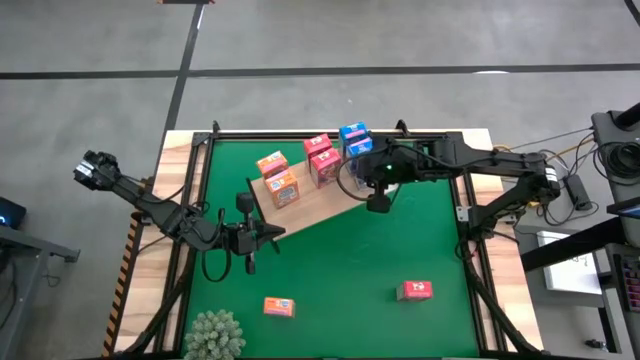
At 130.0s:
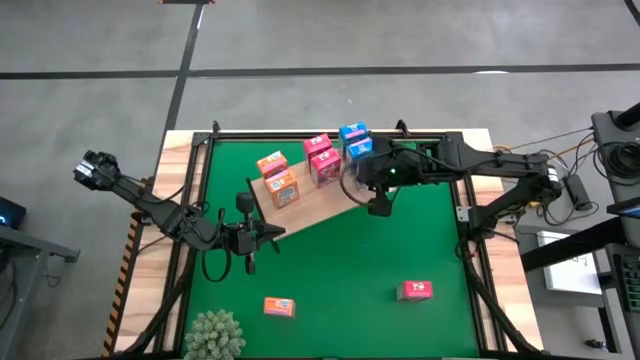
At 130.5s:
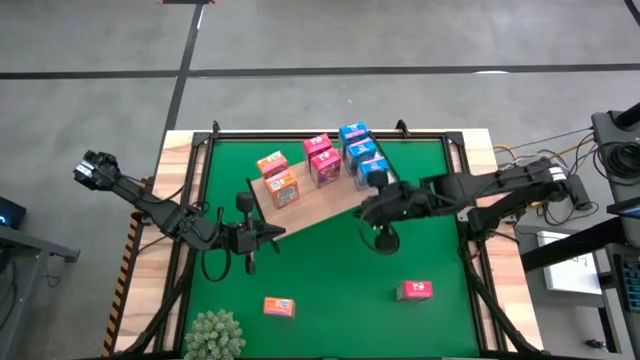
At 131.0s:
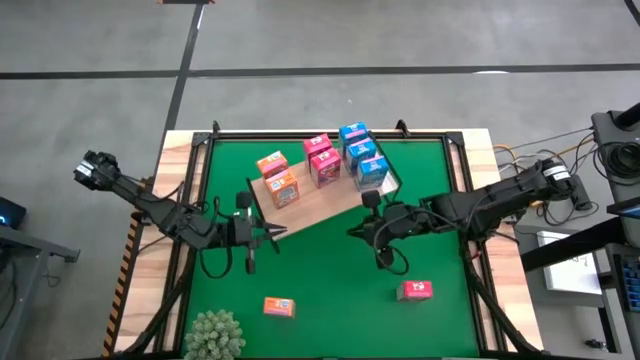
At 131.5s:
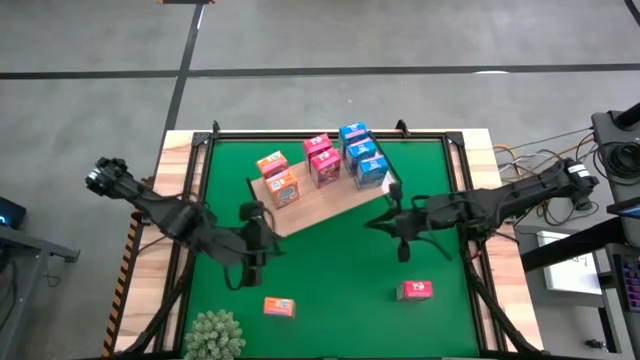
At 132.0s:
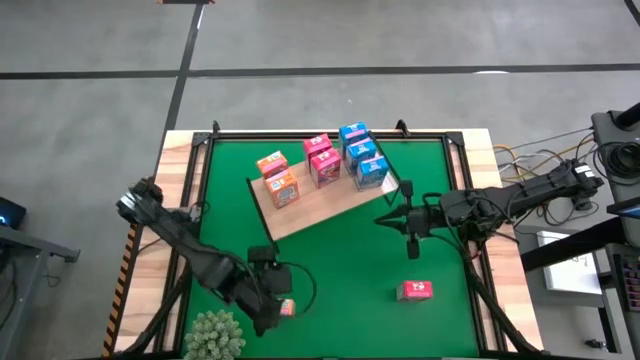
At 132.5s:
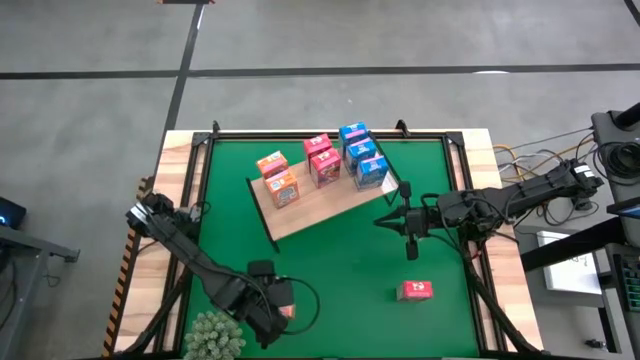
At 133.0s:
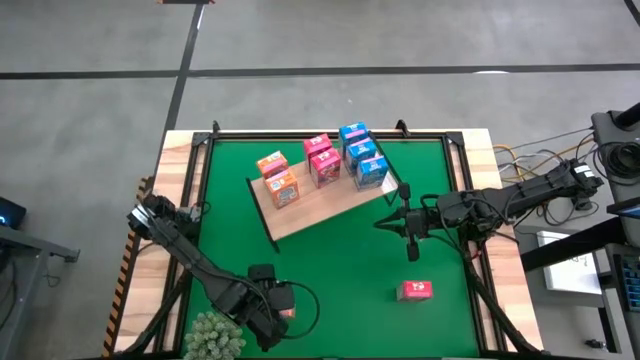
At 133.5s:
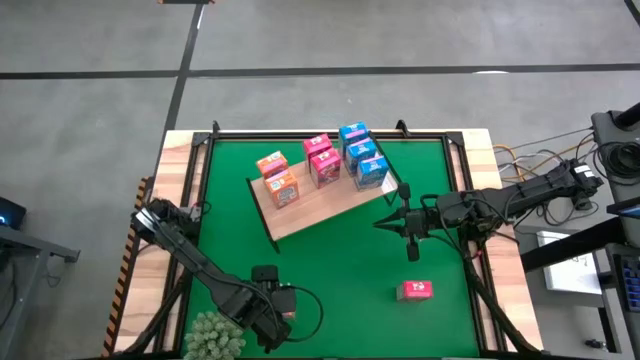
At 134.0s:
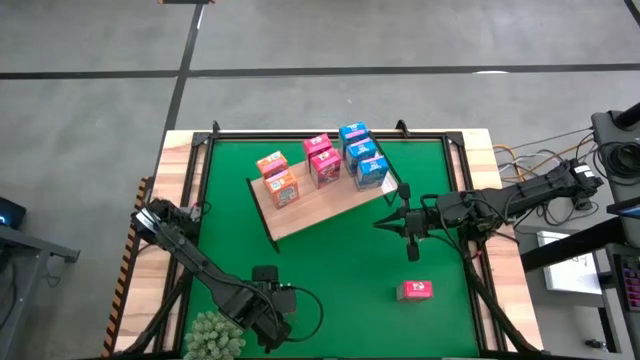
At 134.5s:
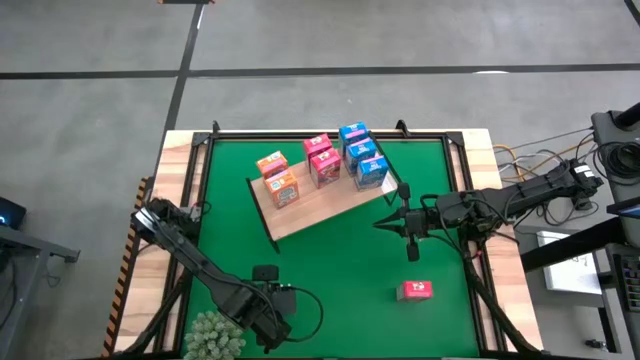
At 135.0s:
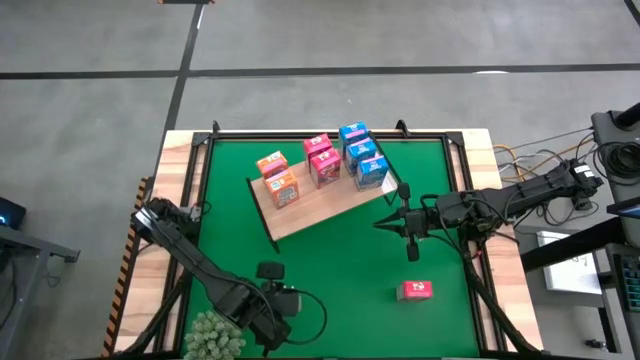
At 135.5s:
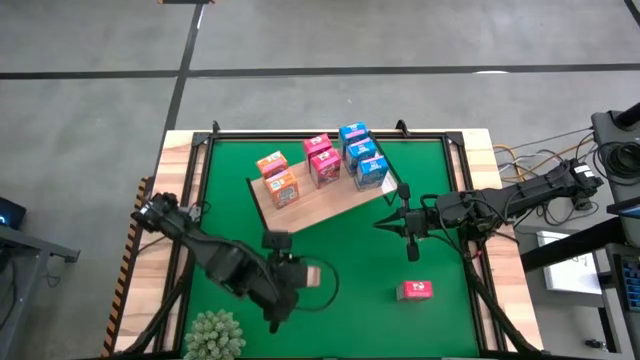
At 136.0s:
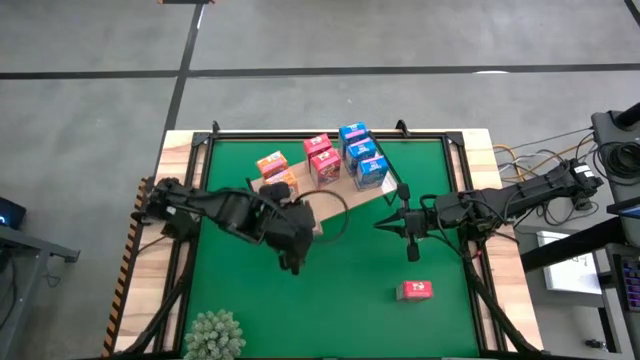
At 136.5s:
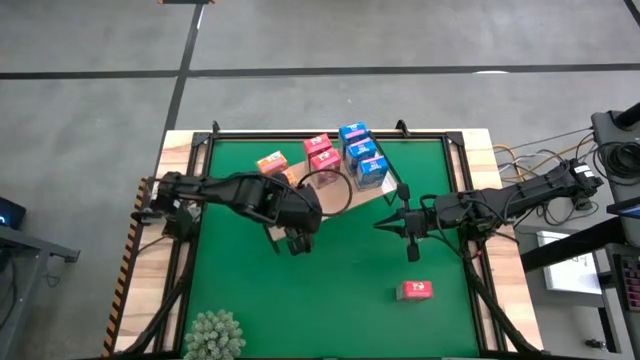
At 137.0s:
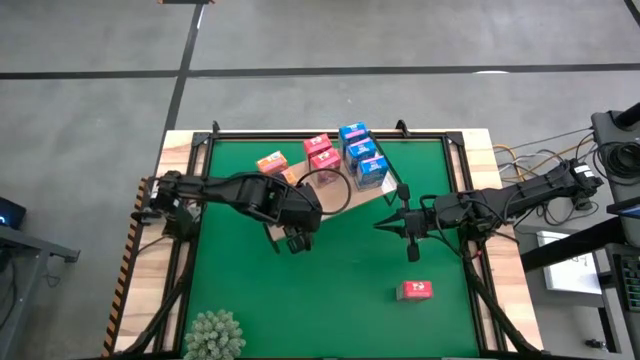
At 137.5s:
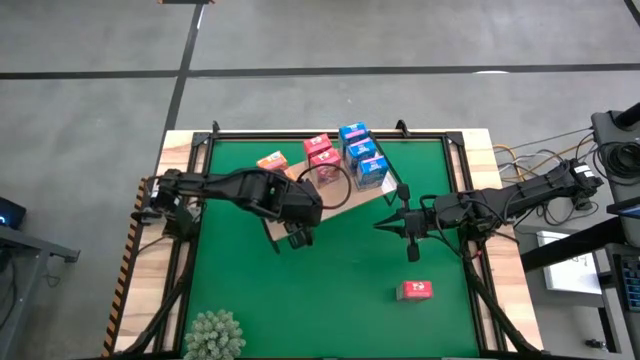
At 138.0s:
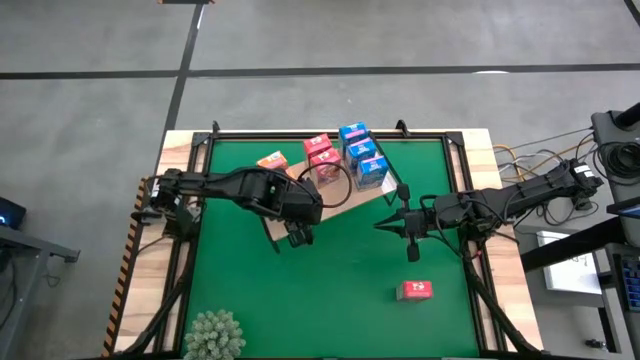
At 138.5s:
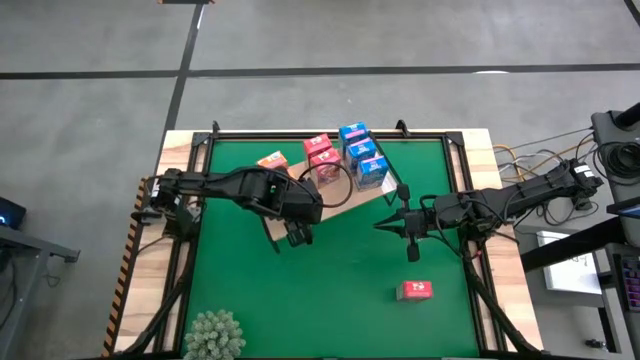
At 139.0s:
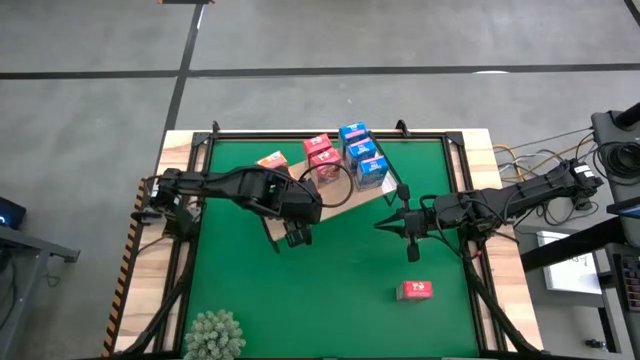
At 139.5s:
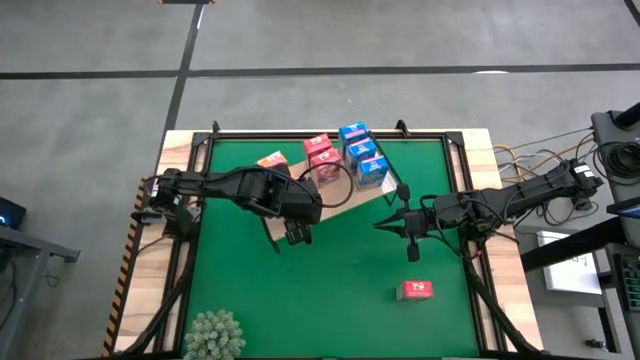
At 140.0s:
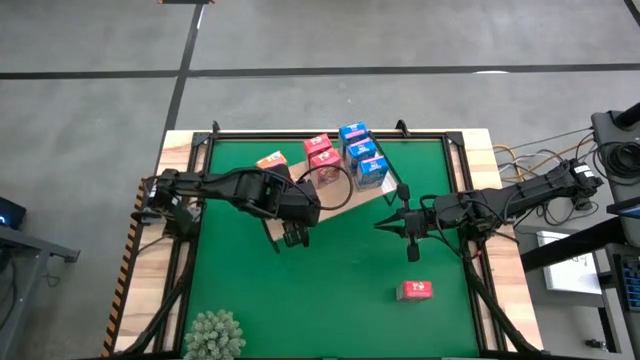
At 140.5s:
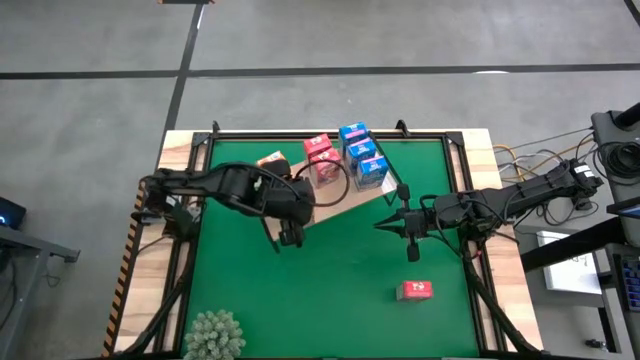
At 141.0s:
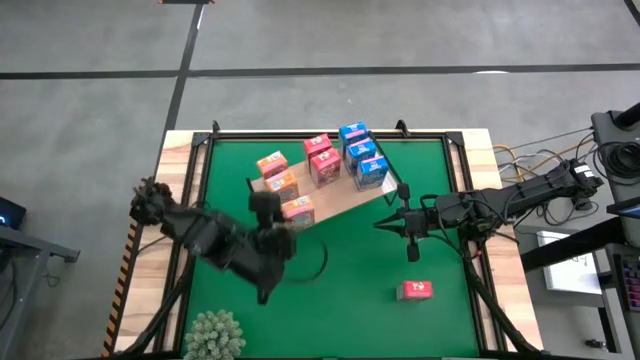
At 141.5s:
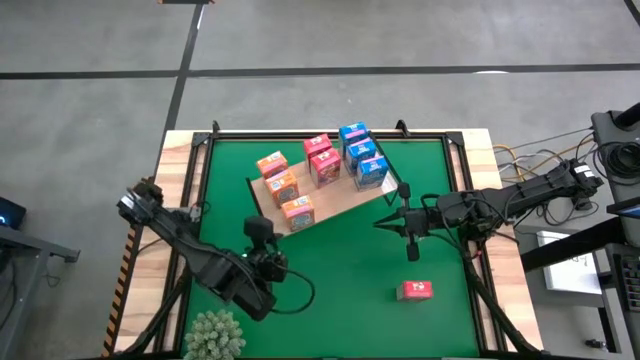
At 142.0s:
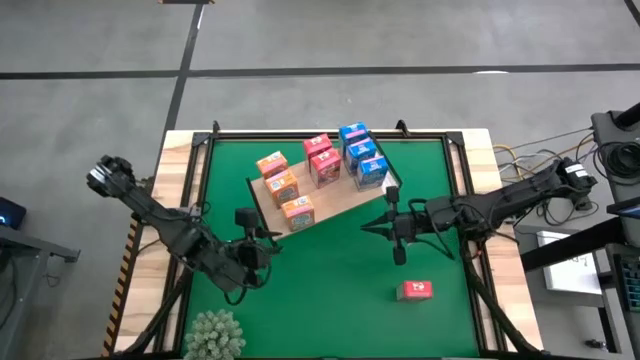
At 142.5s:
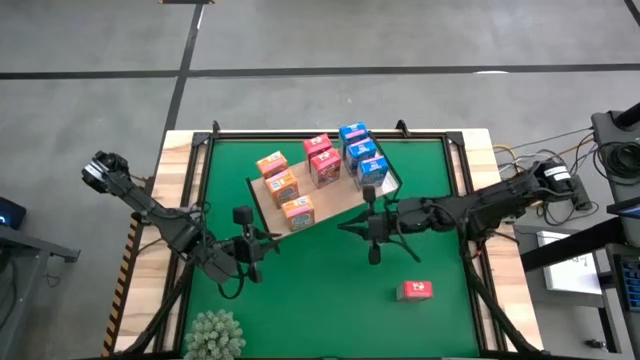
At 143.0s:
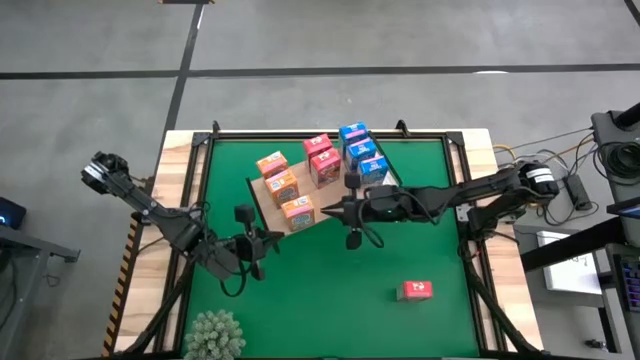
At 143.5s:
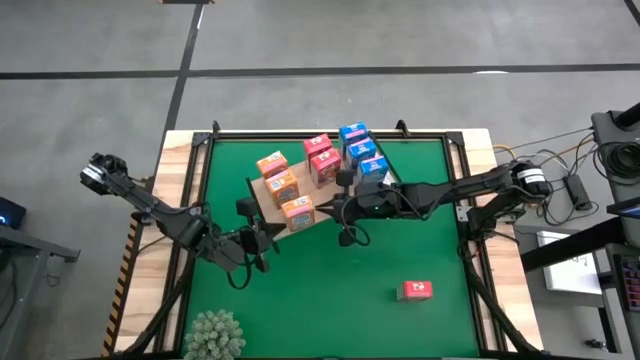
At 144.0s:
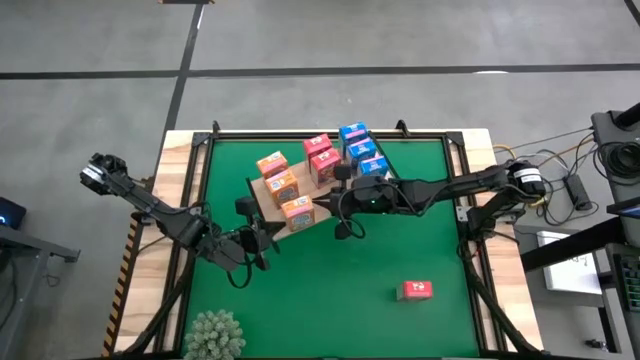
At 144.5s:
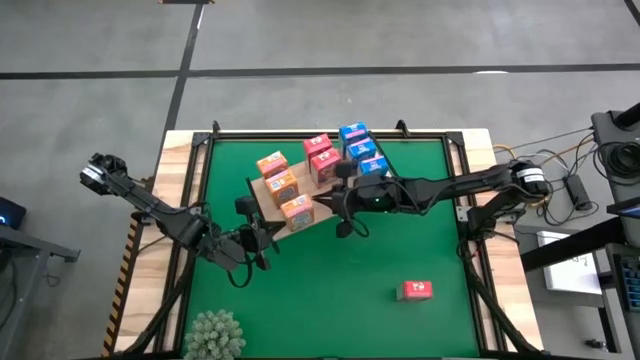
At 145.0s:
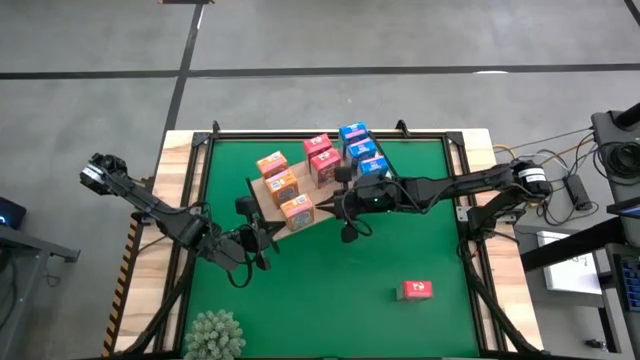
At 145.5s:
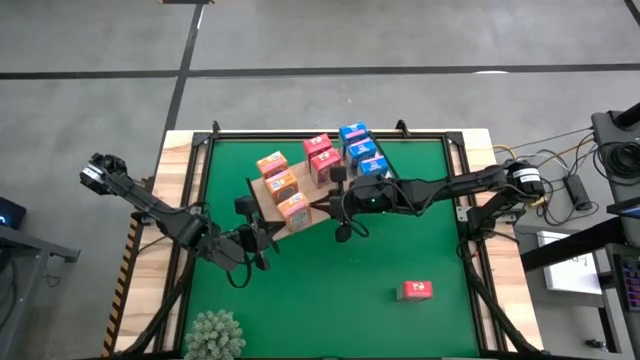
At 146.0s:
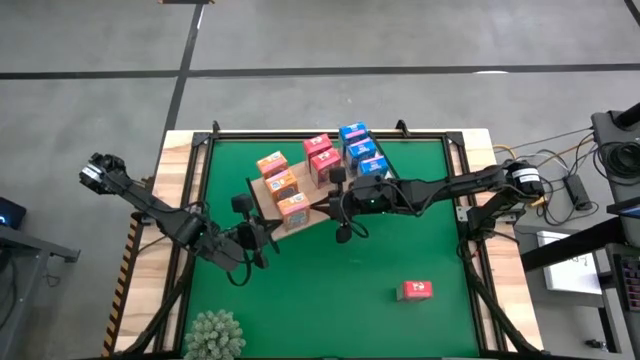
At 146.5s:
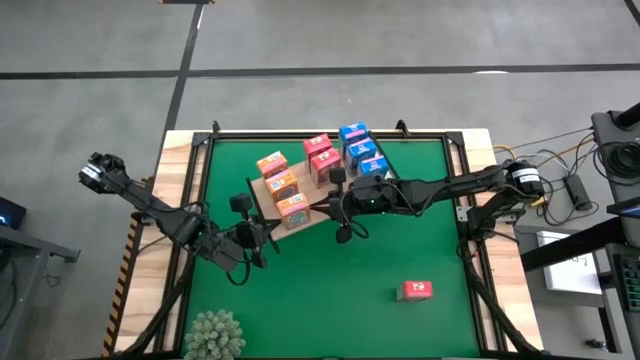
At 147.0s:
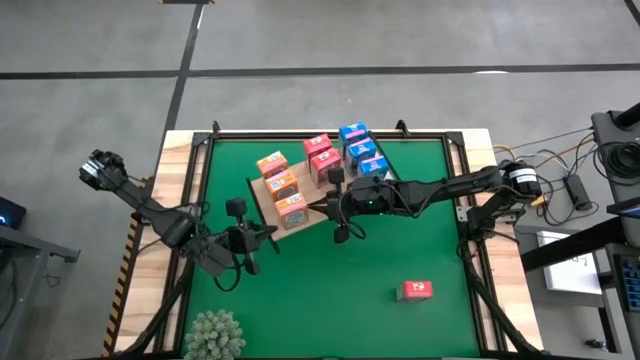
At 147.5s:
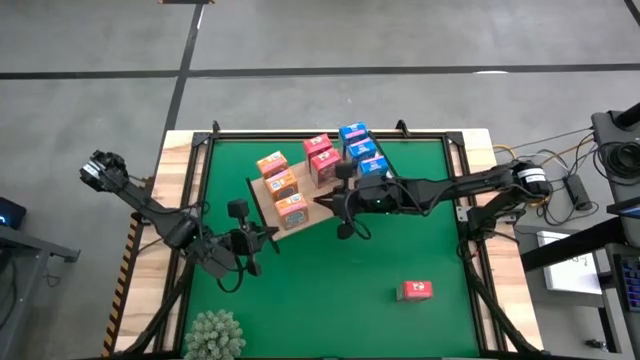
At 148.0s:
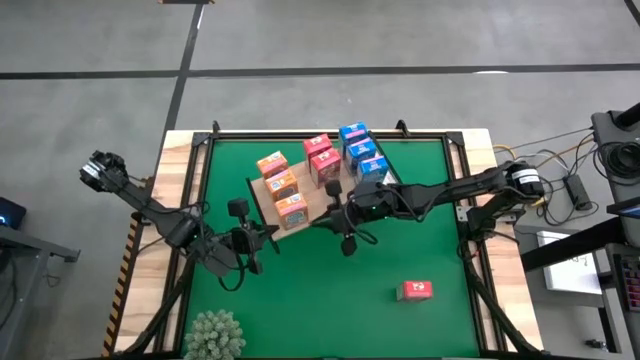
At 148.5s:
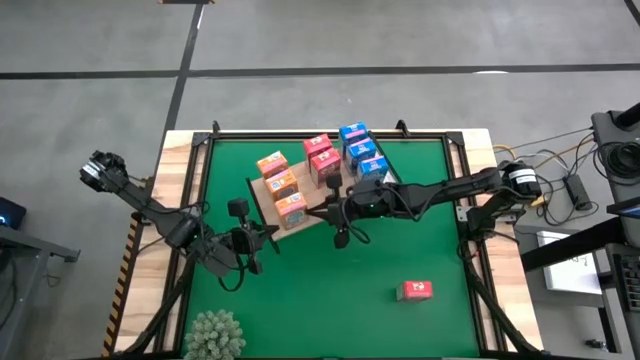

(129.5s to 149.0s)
Task: Stack cereal on shelf
Put the orange cereal box on the shelf aligned with other orange cereal boxes

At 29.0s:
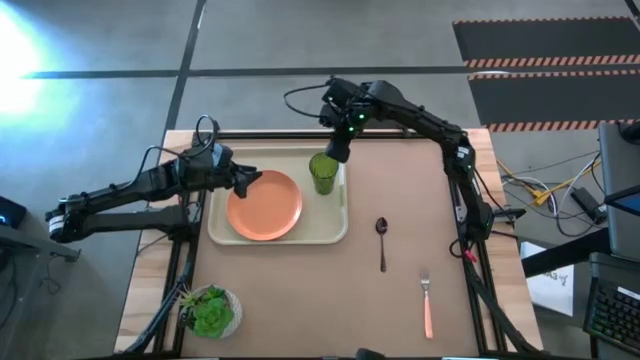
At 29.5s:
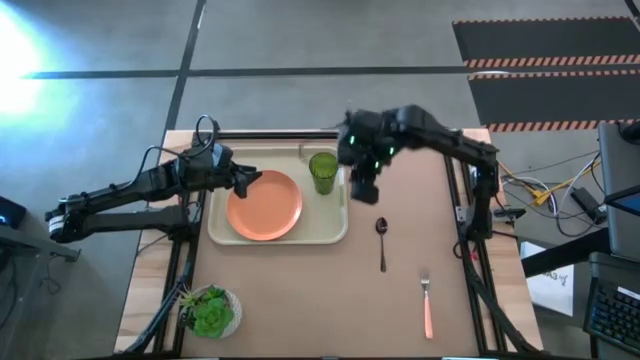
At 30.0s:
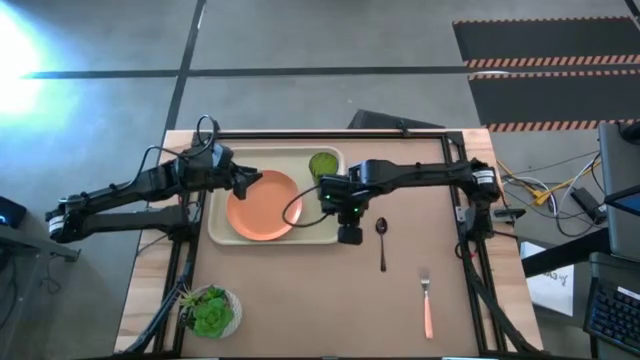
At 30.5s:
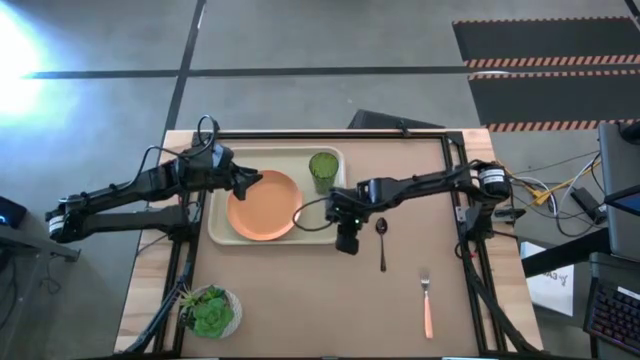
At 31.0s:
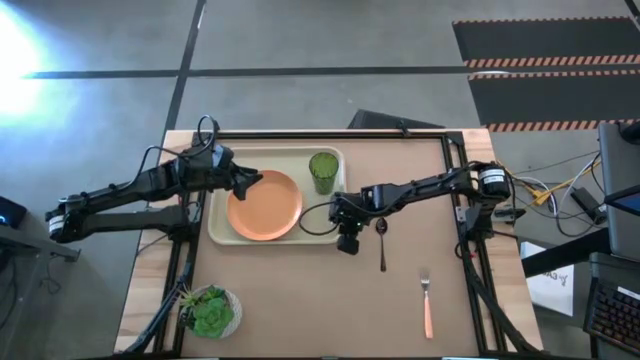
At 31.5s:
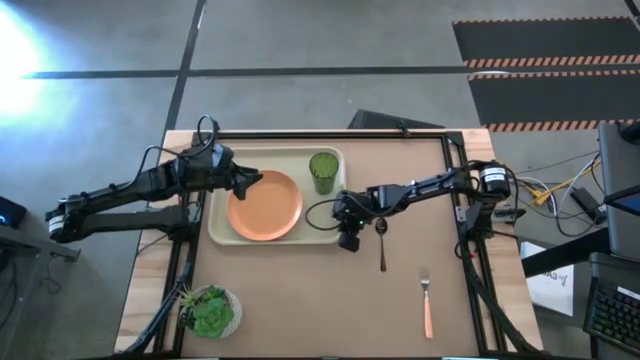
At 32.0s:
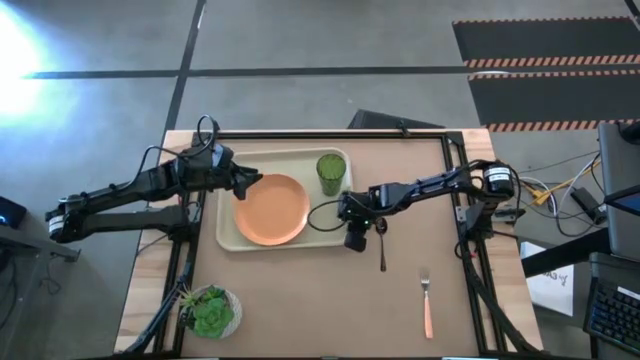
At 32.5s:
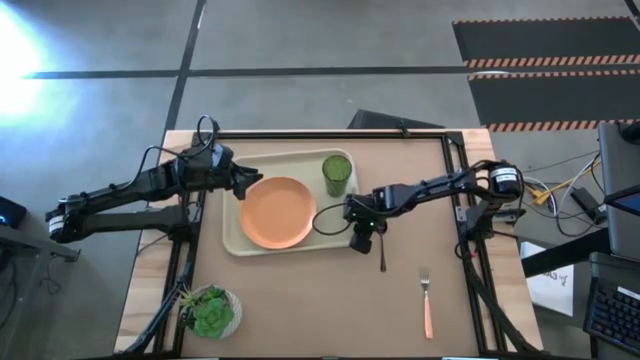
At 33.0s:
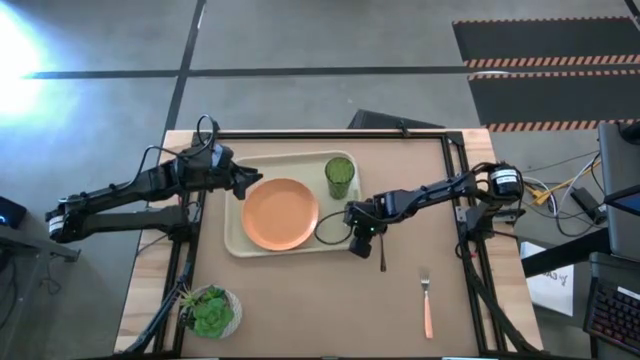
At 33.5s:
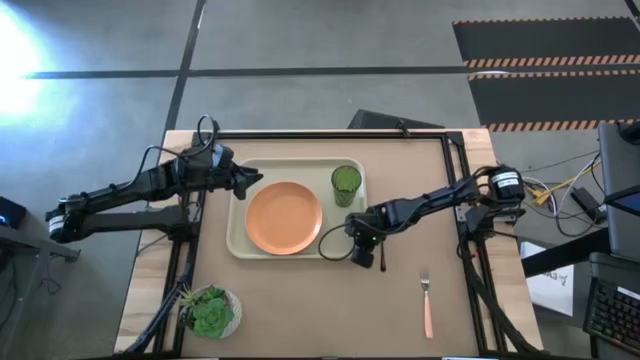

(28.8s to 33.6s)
Task: Pick and place plate/cup/fork/spoon on tray
Adjust the white serving tray on the table
